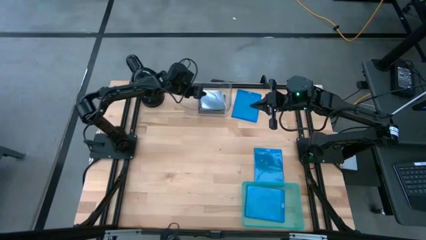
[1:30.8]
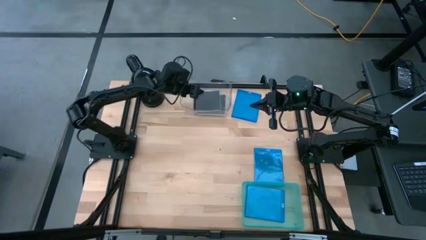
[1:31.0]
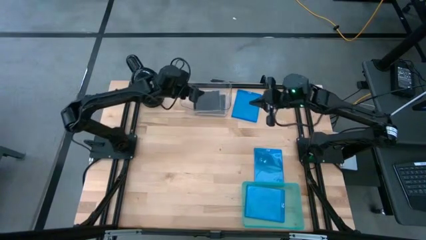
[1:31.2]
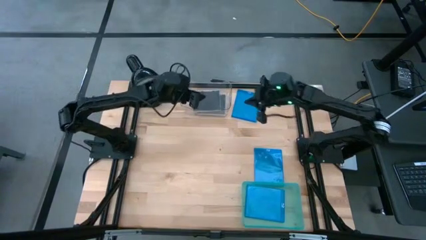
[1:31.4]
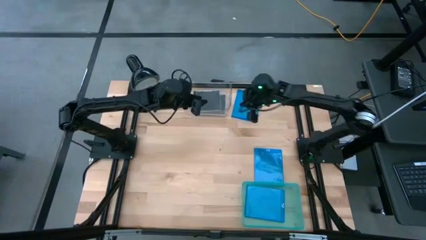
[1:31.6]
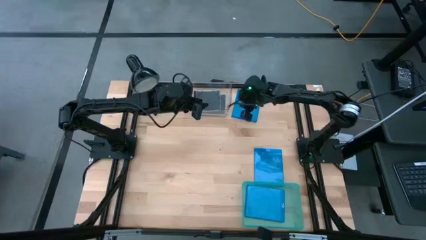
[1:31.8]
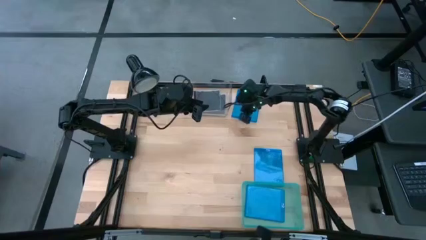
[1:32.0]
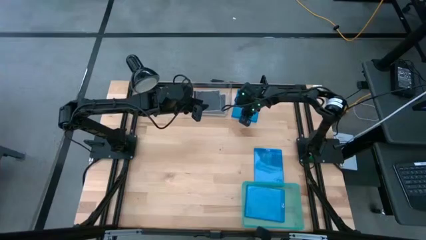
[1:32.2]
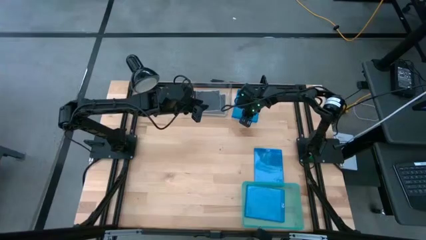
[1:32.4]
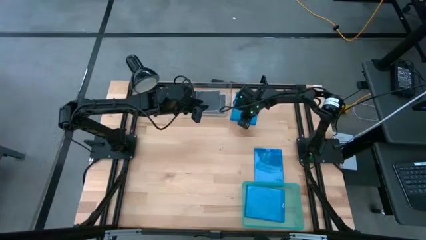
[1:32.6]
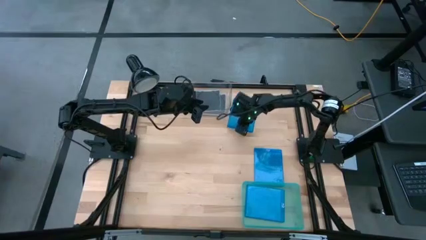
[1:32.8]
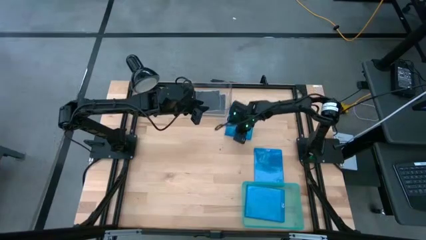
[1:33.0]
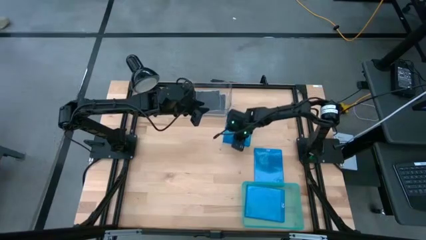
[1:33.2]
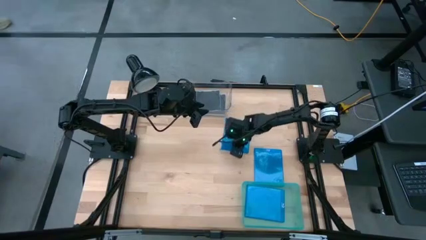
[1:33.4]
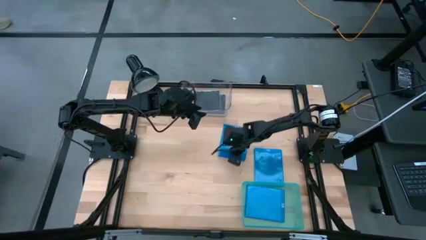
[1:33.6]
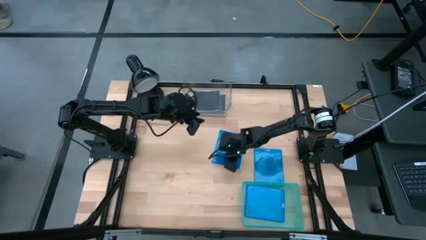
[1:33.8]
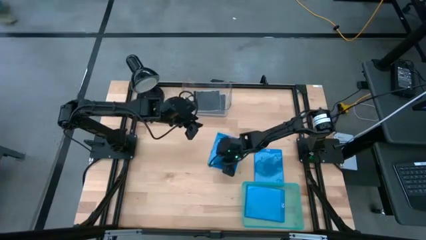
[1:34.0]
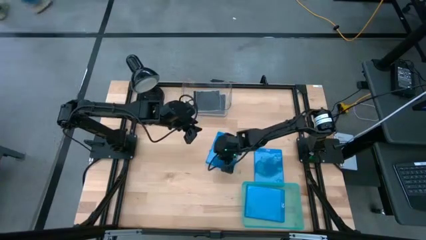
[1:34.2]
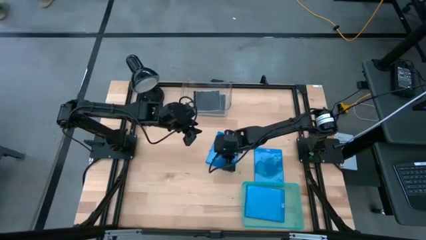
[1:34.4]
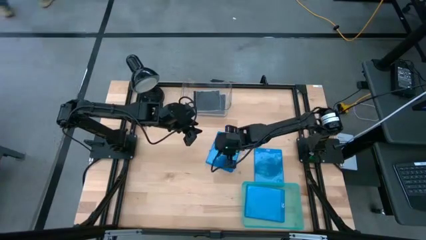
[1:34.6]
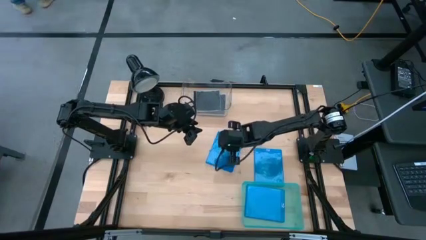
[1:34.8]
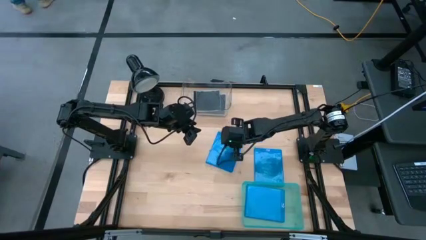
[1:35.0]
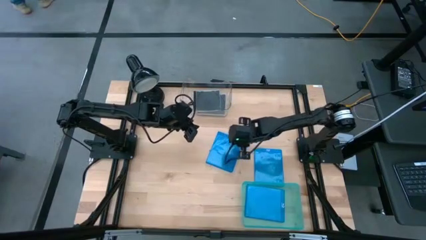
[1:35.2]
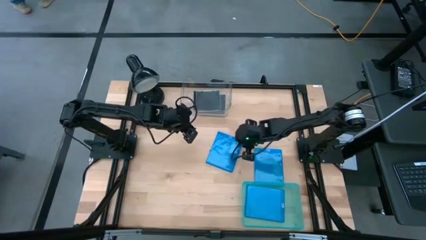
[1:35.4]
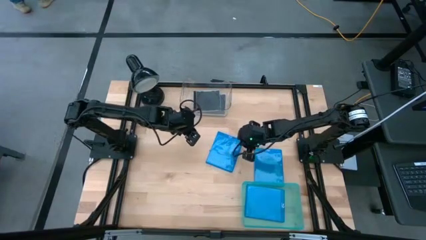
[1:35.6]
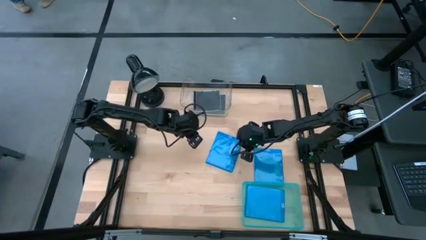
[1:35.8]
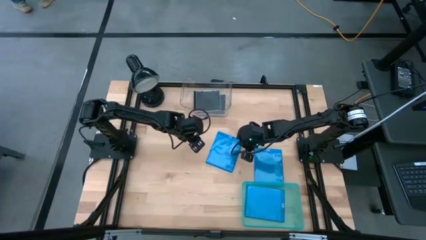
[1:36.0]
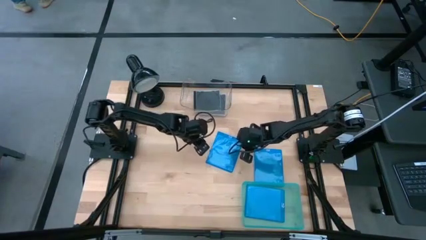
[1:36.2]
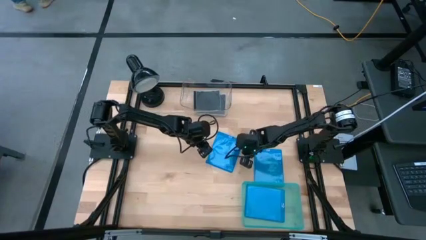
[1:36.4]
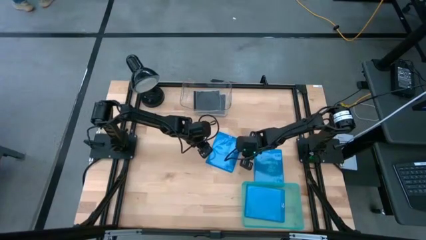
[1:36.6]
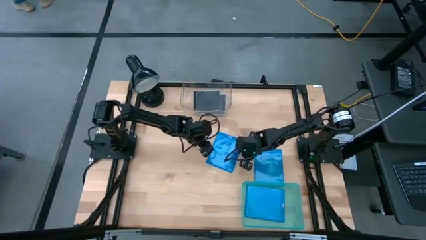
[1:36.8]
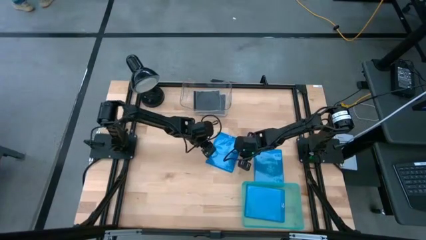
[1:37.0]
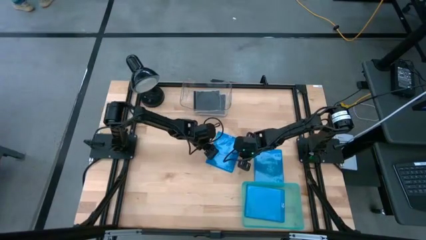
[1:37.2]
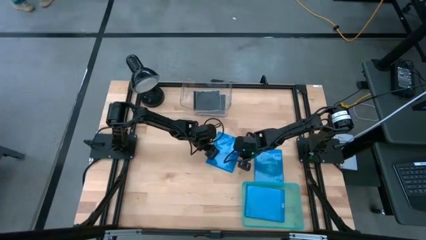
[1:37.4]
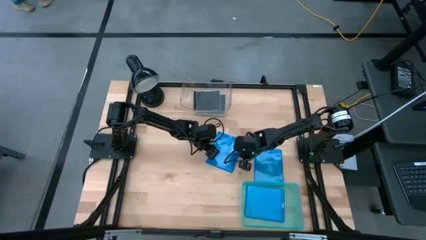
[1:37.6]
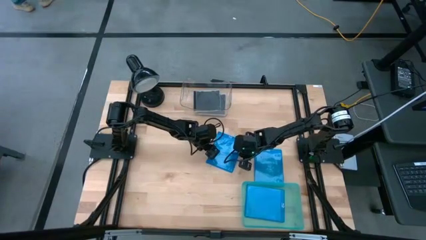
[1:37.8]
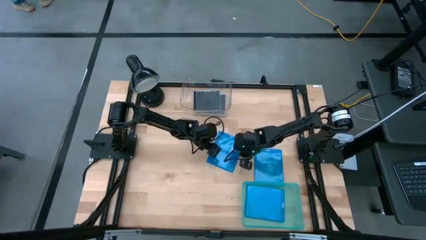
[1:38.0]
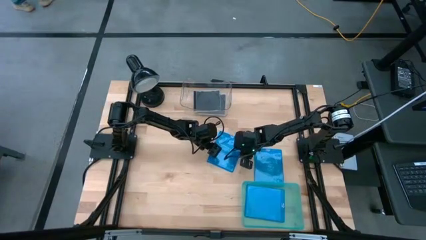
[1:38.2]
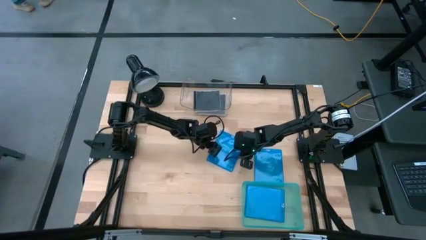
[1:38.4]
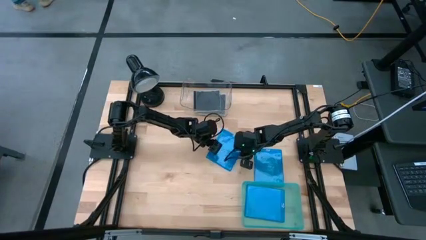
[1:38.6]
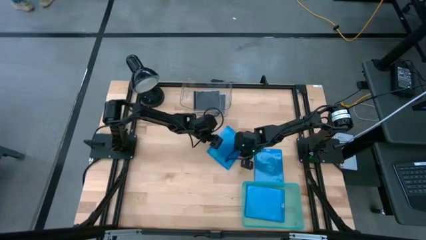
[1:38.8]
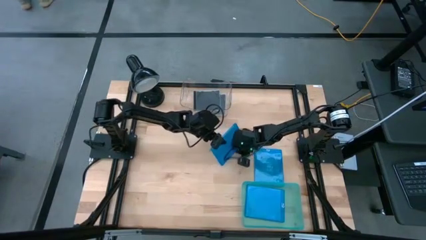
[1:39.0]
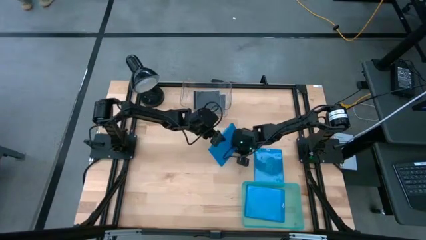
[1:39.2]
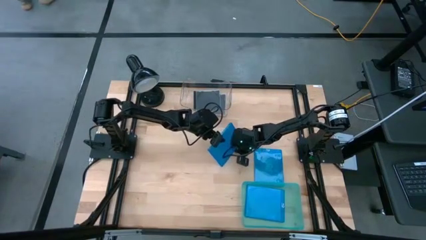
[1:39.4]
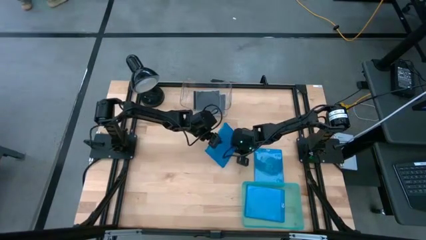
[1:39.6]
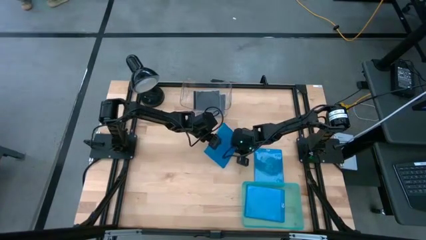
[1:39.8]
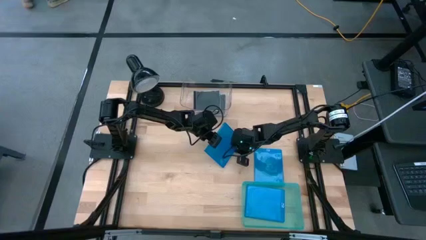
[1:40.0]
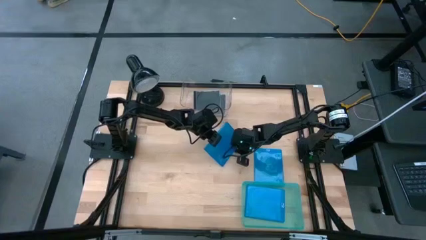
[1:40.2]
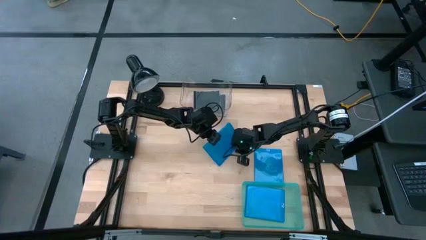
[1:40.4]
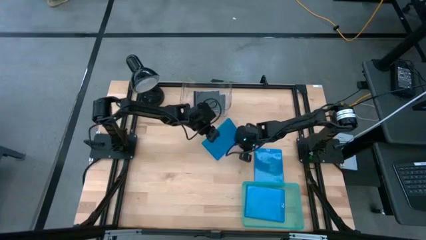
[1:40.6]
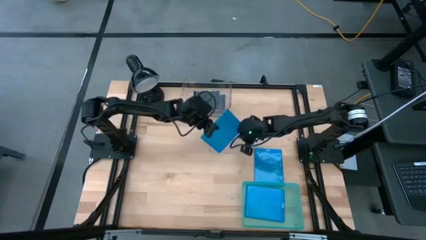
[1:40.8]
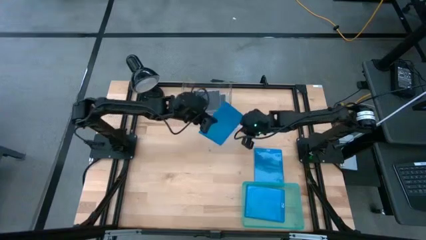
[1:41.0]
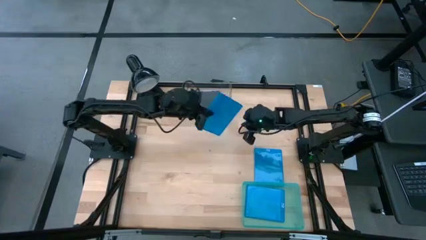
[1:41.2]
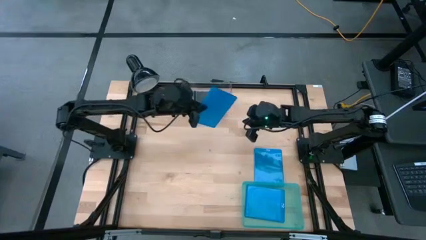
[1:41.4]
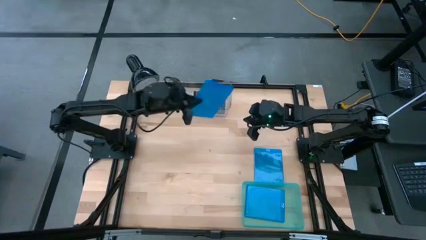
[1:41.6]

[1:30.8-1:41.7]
Task: Pick & place jewel cases by type
Put the top blue cd case into the green bin

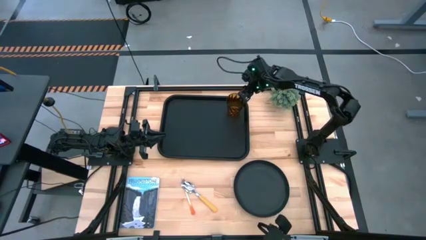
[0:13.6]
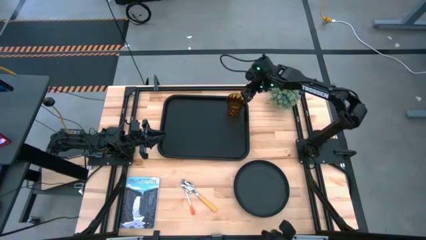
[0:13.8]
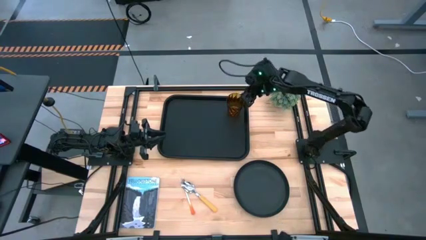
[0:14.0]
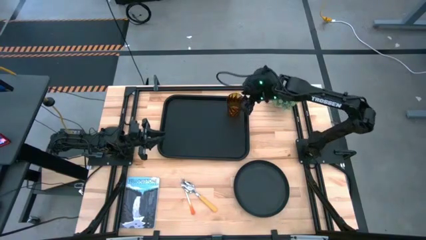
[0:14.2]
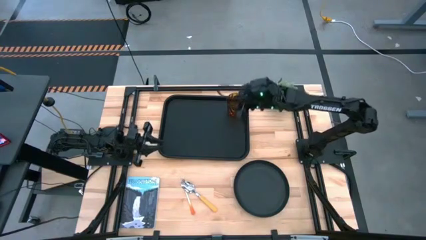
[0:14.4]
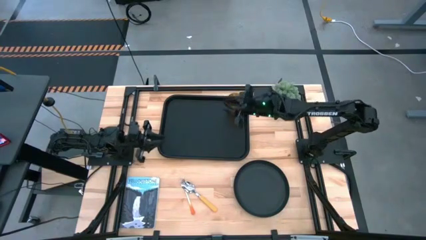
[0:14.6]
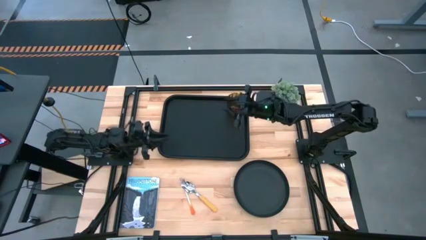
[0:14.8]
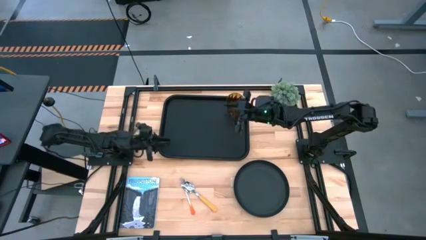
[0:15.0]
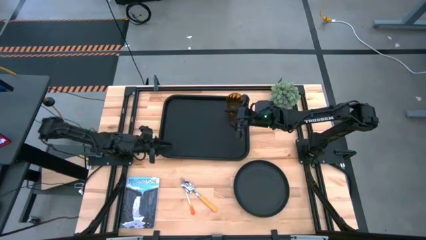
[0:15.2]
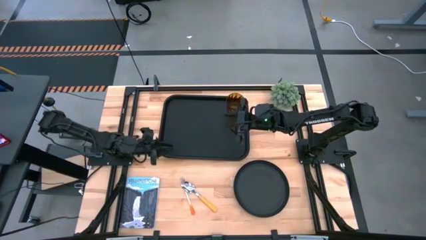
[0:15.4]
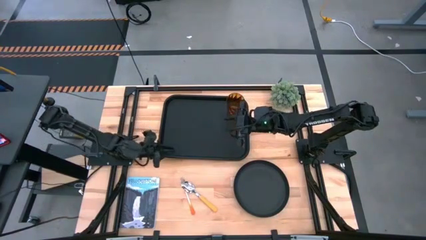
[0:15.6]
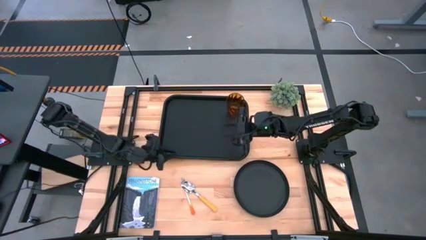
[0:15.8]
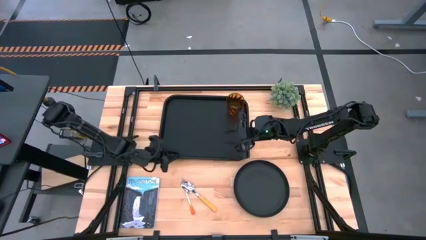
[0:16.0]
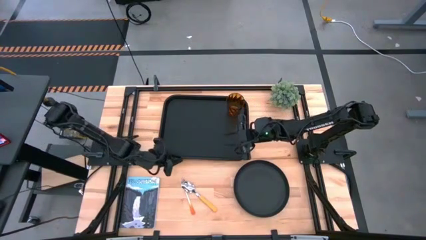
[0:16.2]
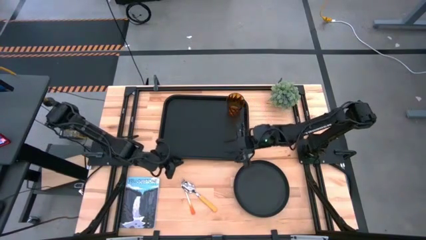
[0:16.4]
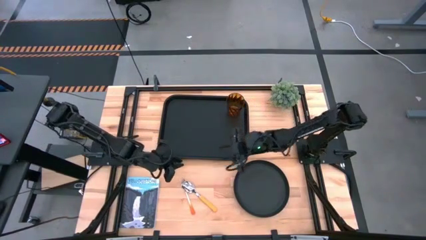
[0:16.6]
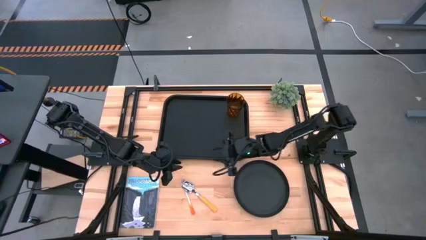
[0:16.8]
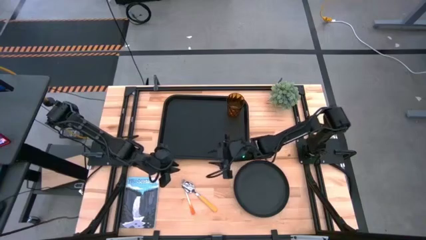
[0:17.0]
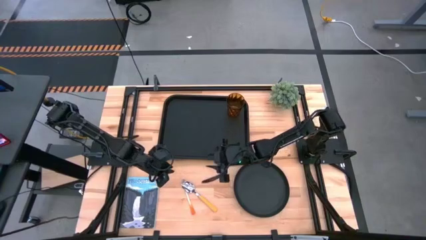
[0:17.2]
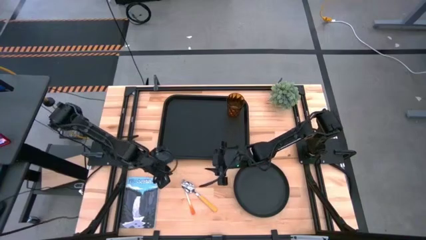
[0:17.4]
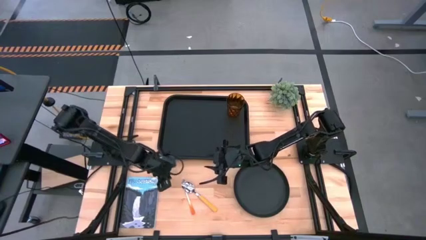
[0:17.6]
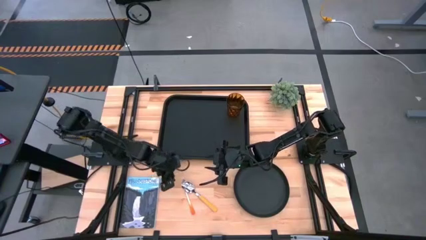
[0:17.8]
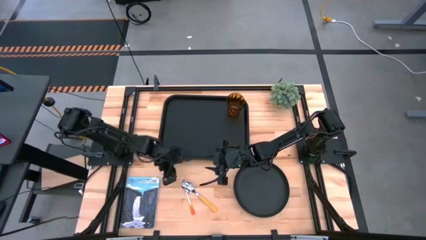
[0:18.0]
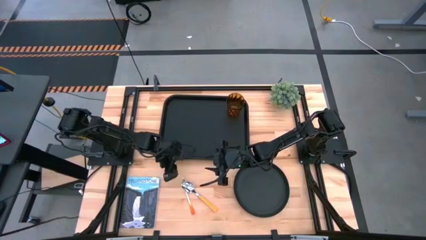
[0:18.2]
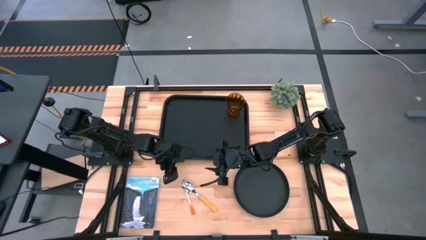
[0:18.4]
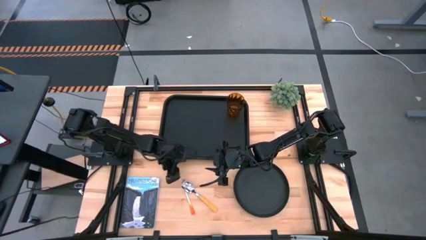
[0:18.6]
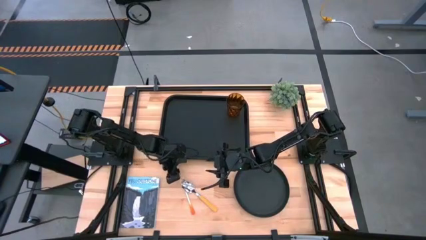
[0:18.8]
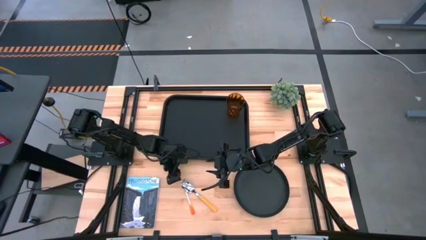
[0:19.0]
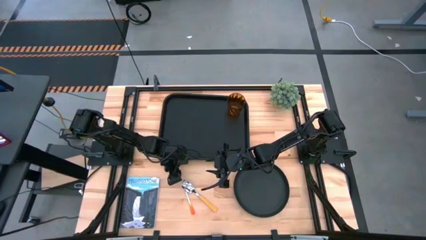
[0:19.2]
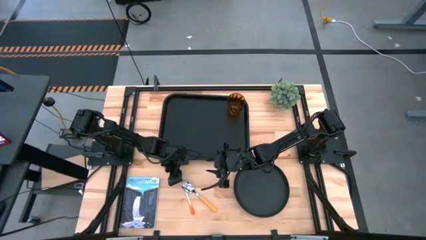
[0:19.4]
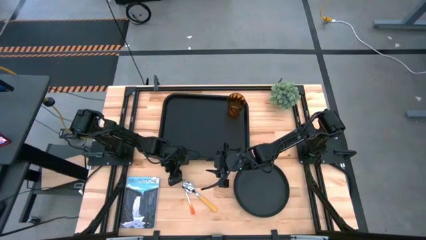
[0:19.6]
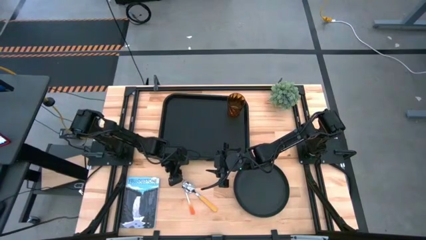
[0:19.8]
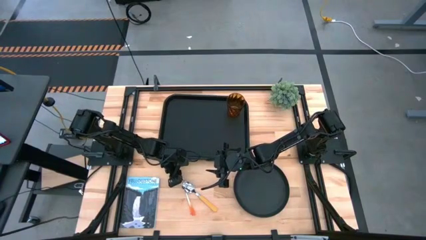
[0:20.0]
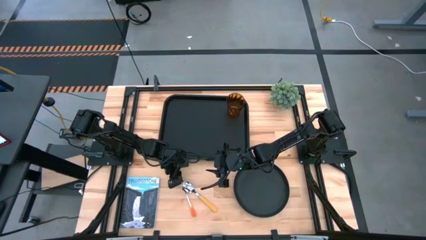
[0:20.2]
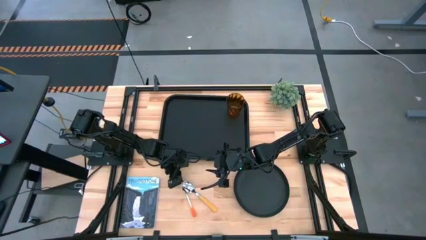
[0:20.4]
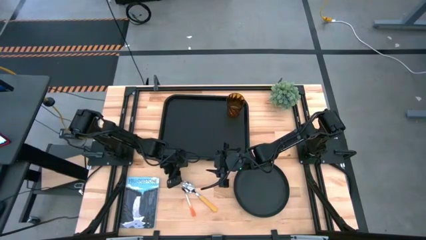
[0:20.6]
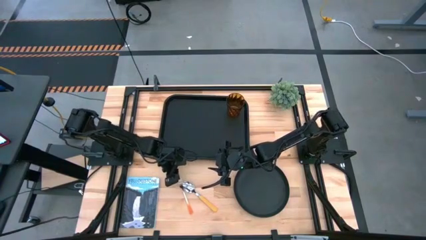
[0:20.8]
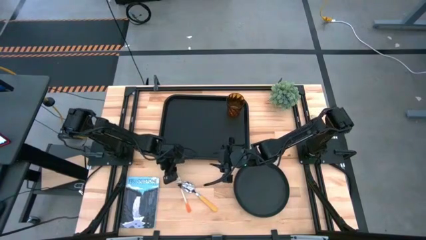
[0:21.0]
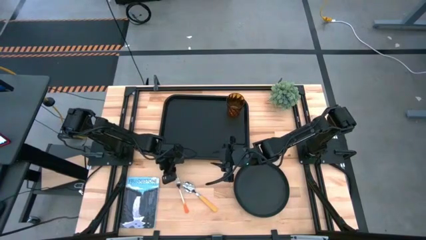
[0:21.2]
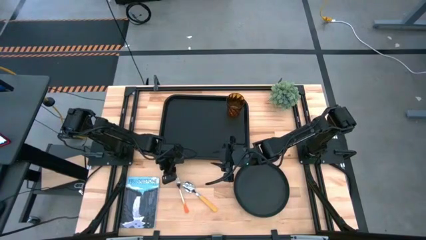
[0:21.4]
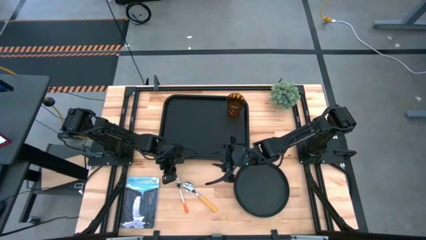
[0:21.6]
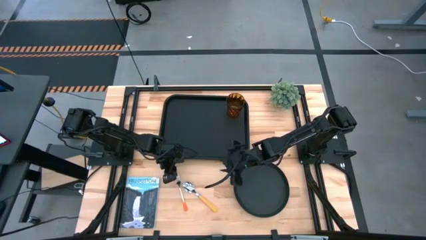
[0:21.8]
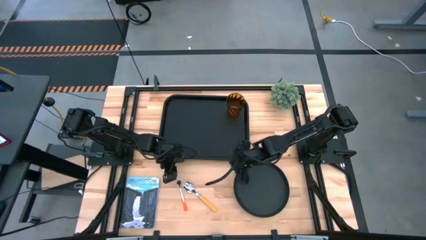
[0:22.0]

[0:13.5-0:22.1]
Task: Pick and place plate/cup/fork/spoon on tray
Put the orange fork on the left of the serving tray
